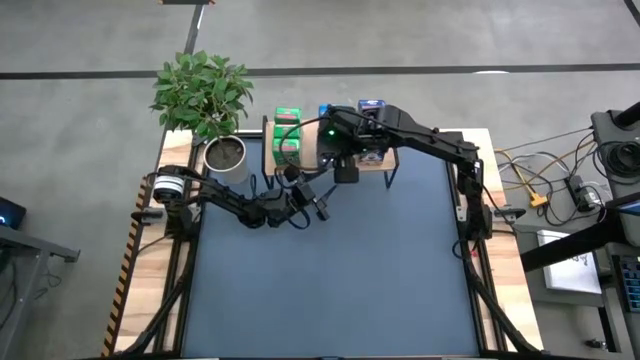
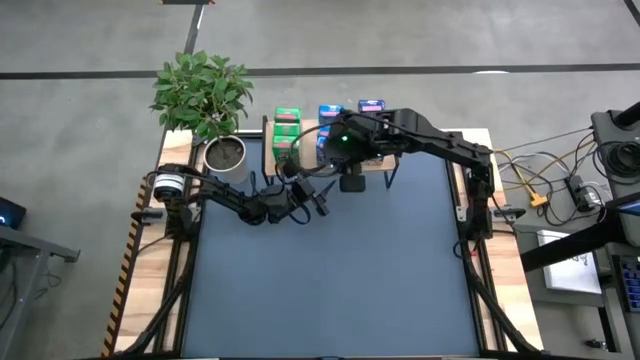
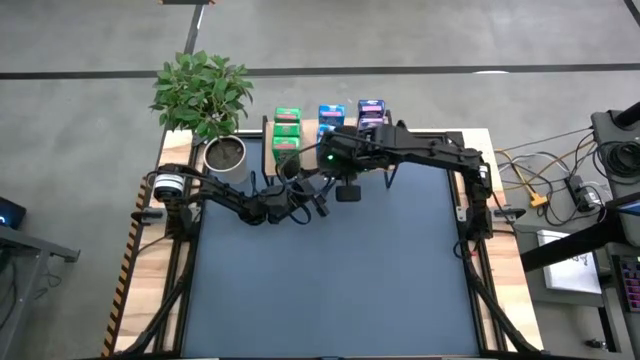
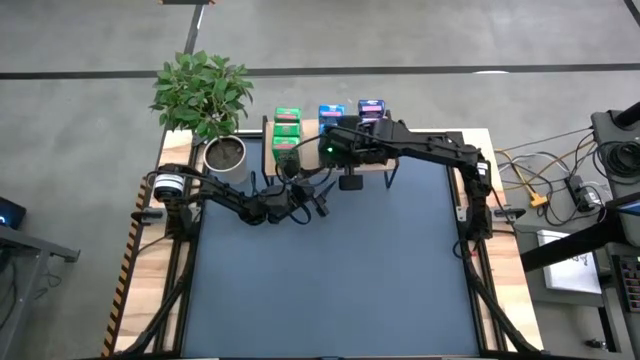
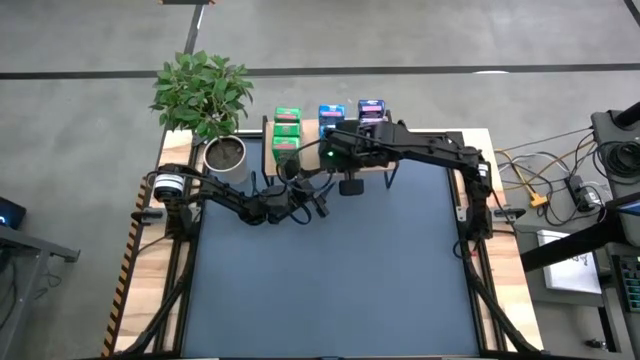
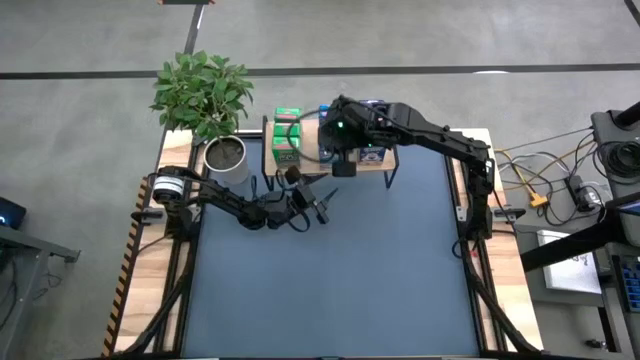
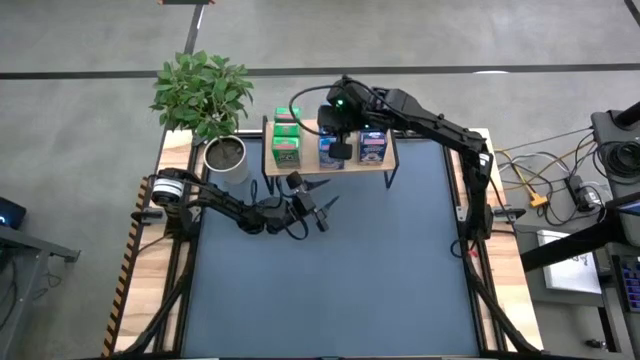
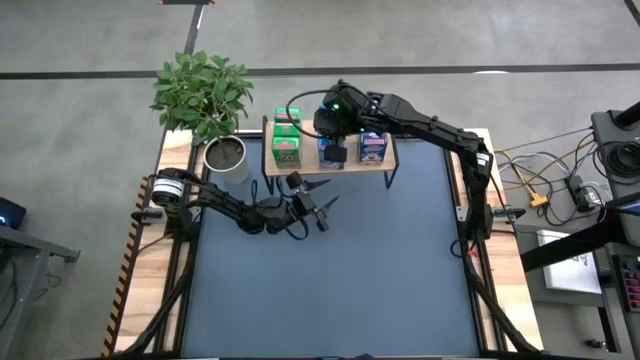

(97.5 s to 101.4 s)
Task: Stack cereal on shelf
Adjust the light blue cereal box on the shelf

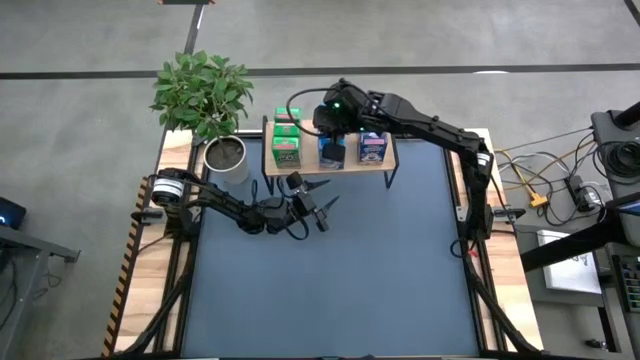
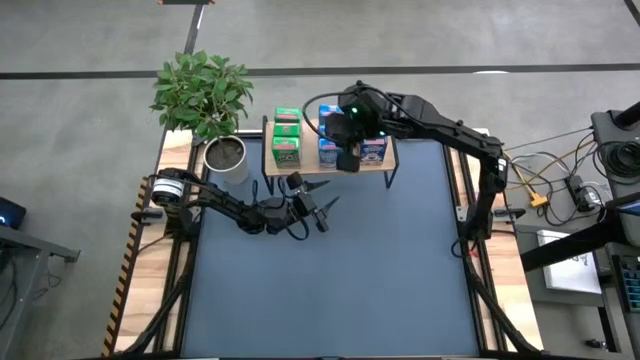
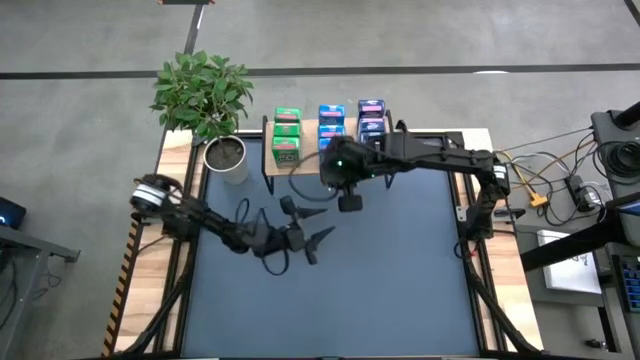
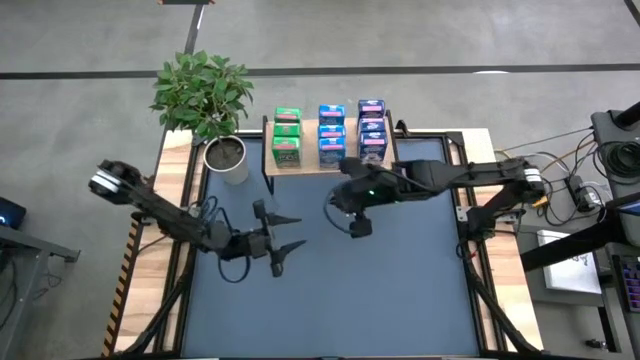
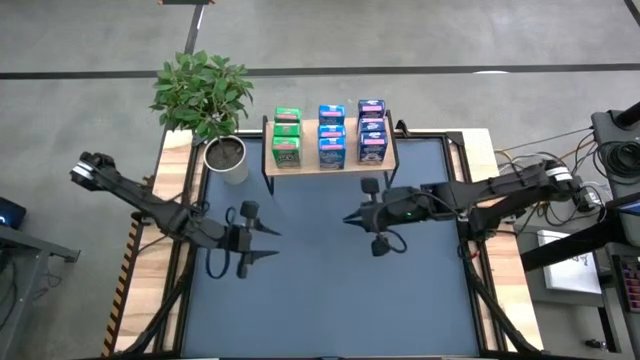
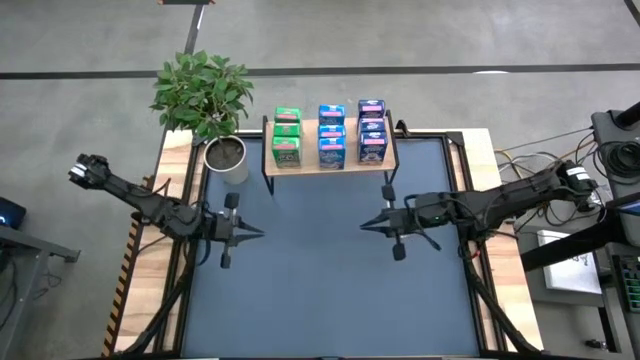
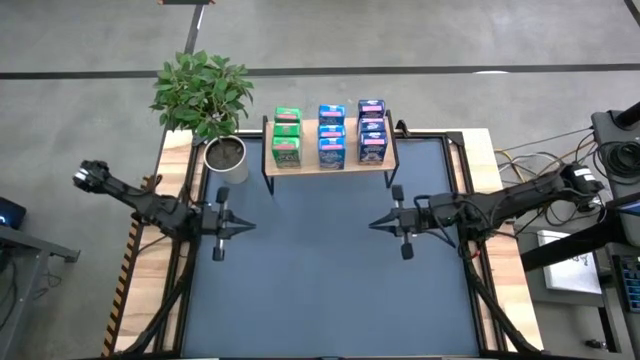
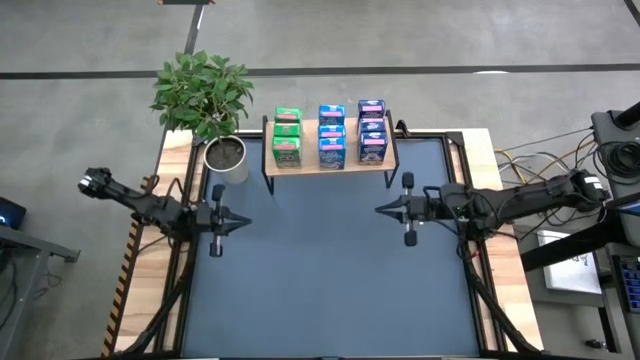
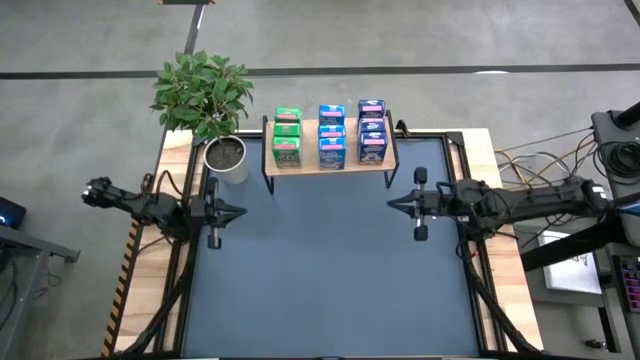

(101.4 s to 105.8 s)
Return to Home Position

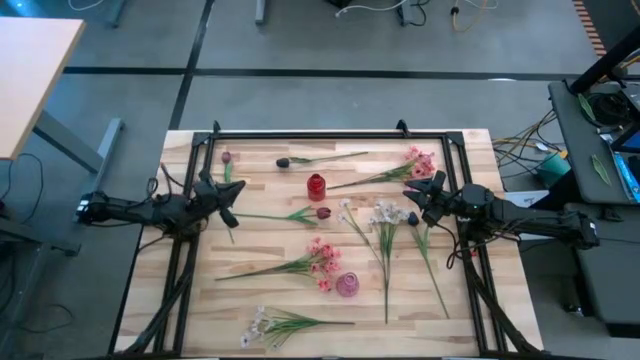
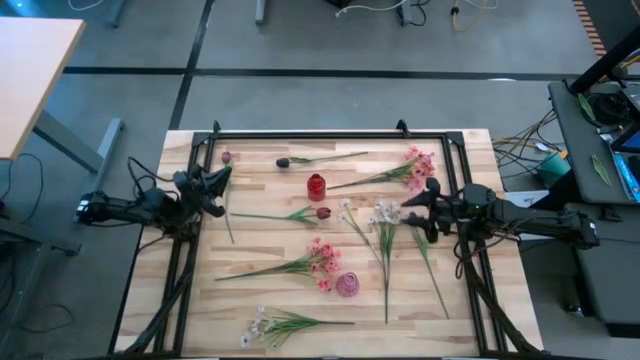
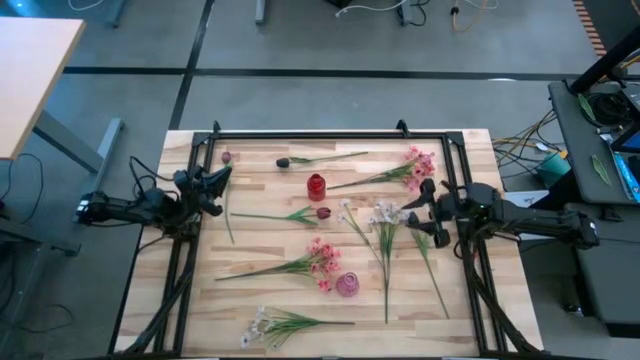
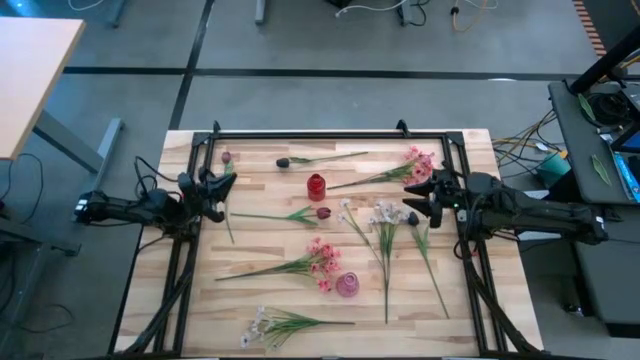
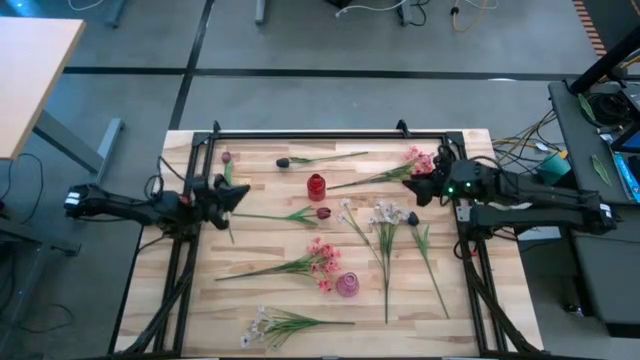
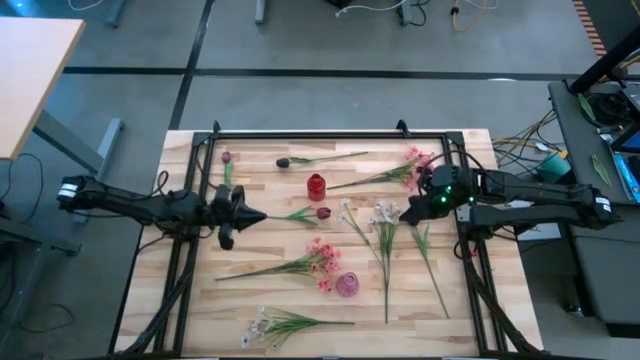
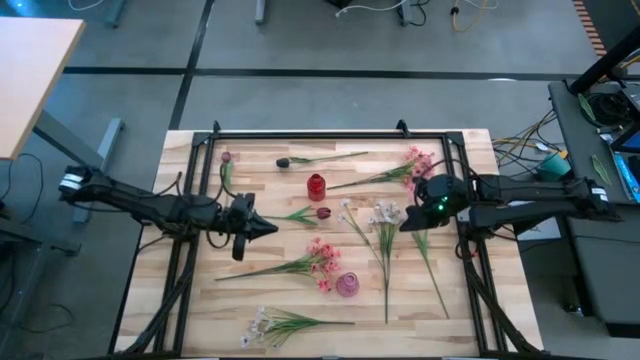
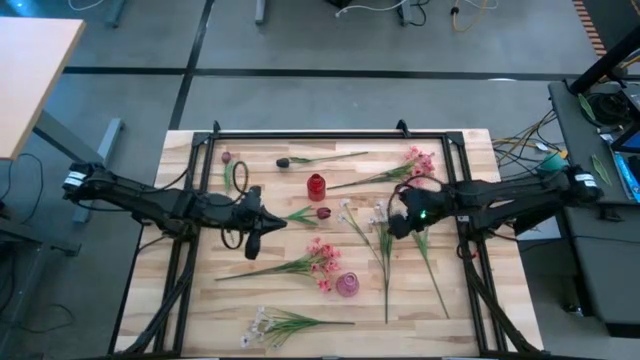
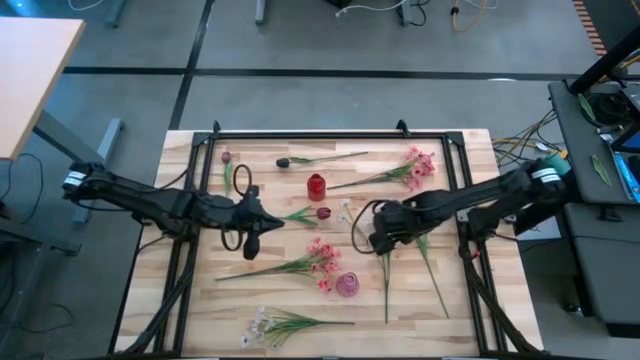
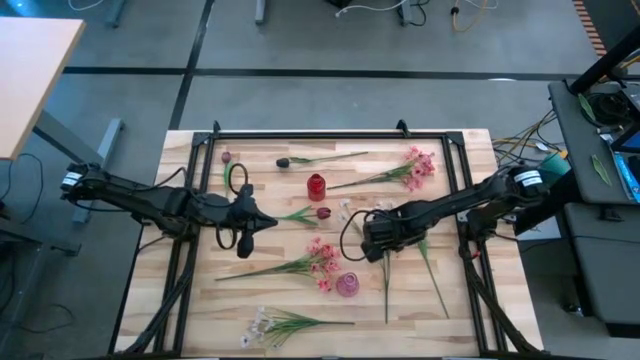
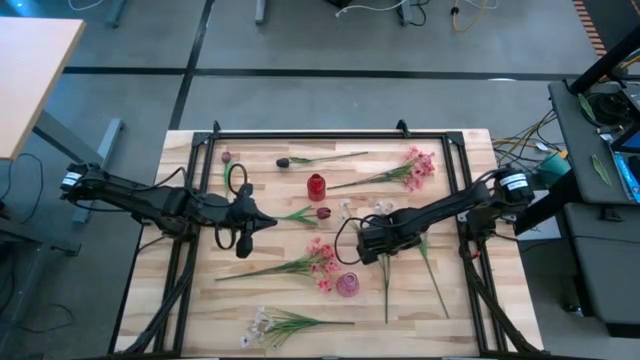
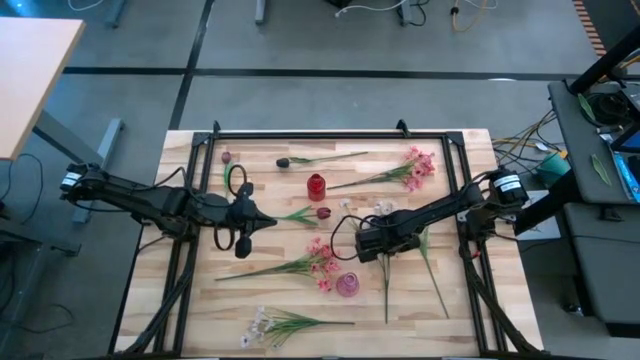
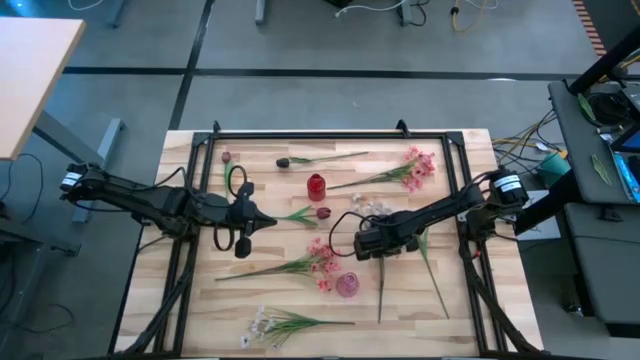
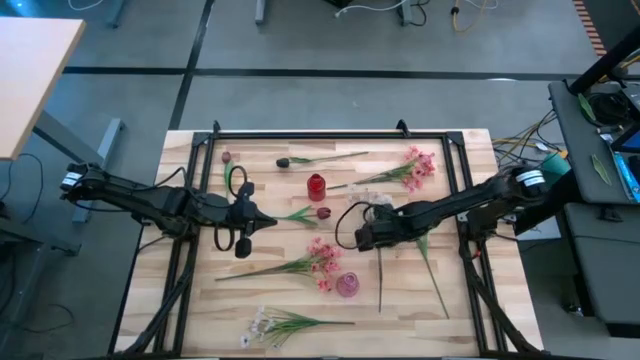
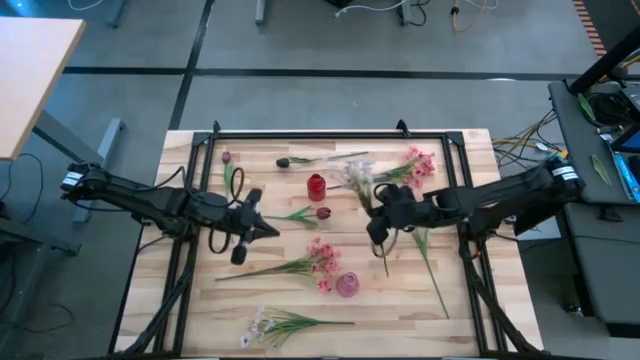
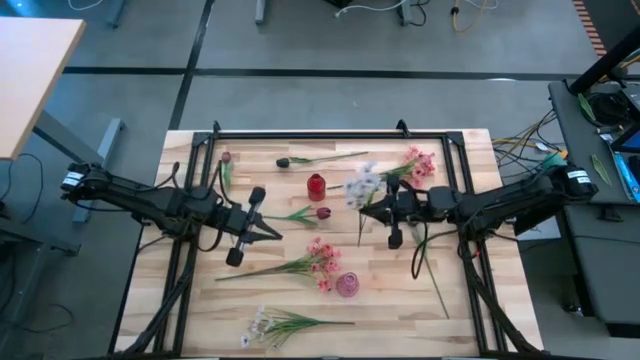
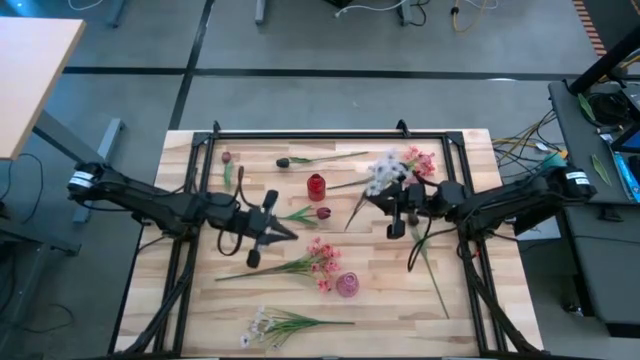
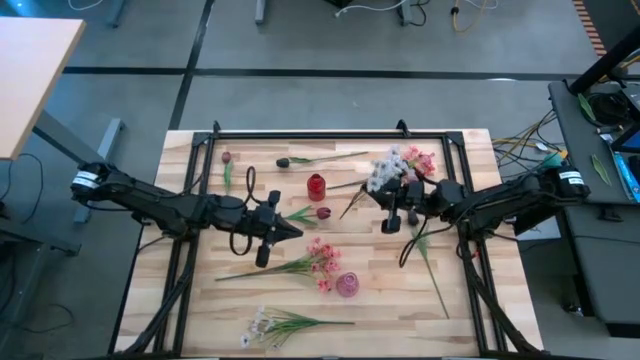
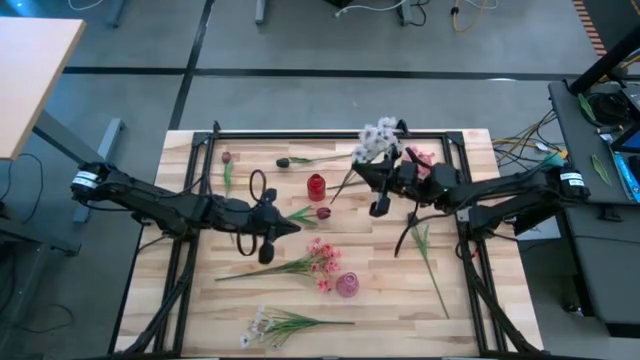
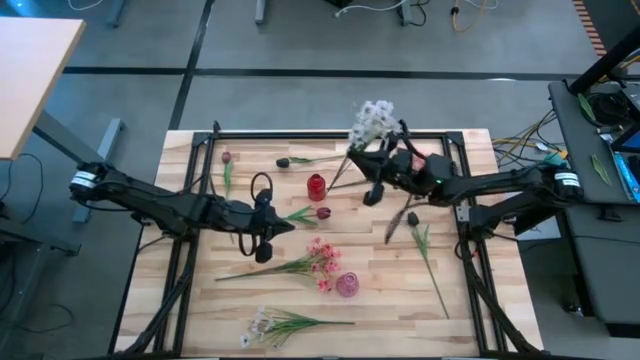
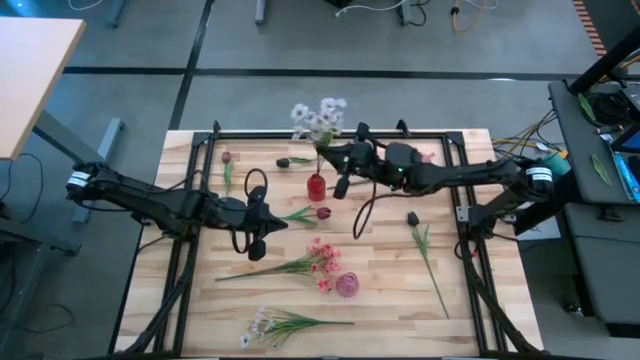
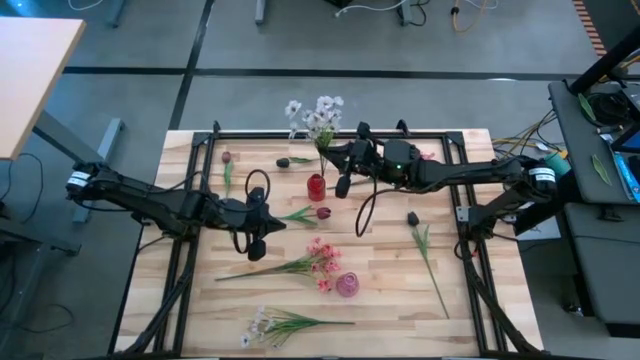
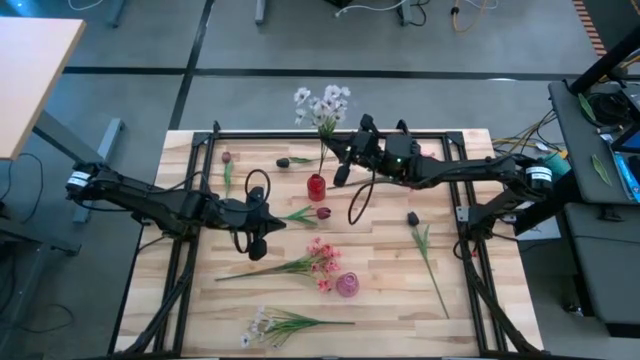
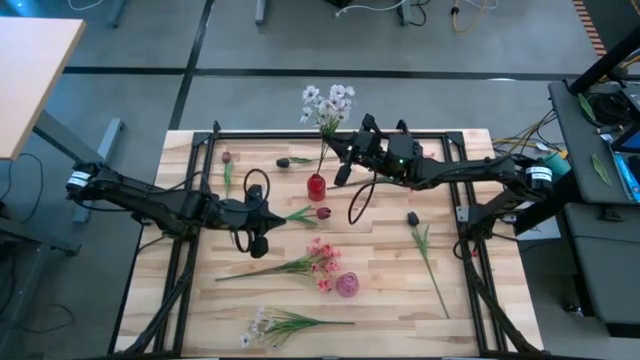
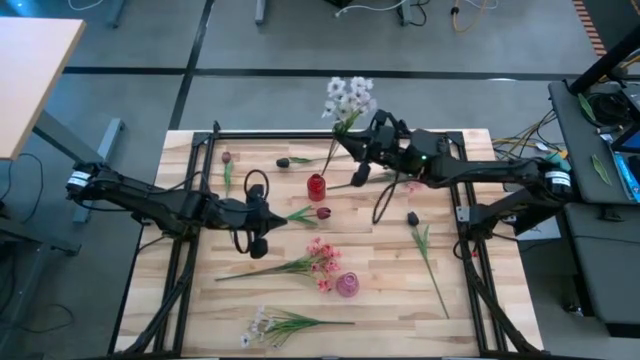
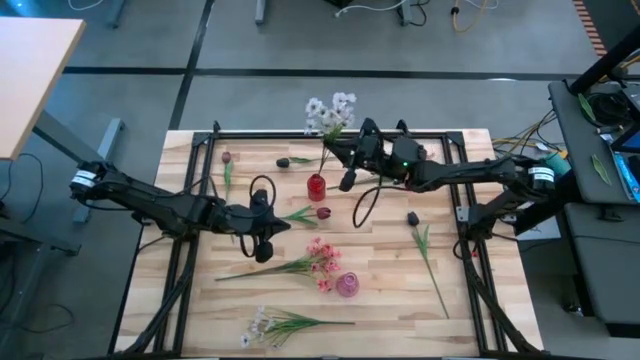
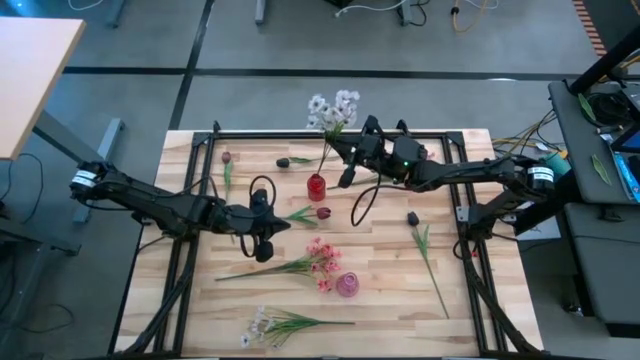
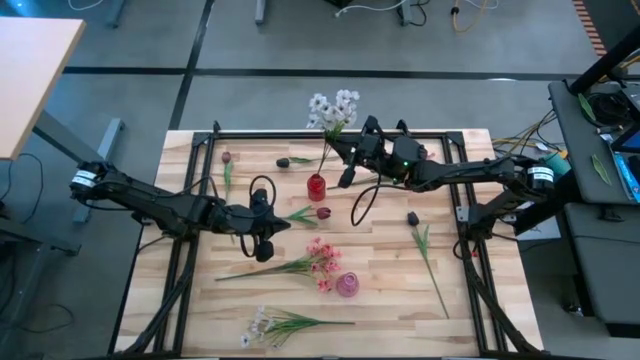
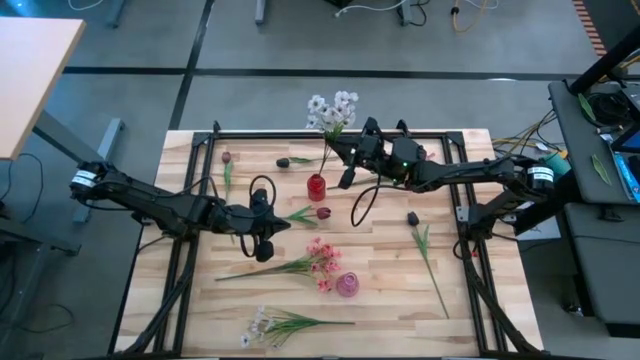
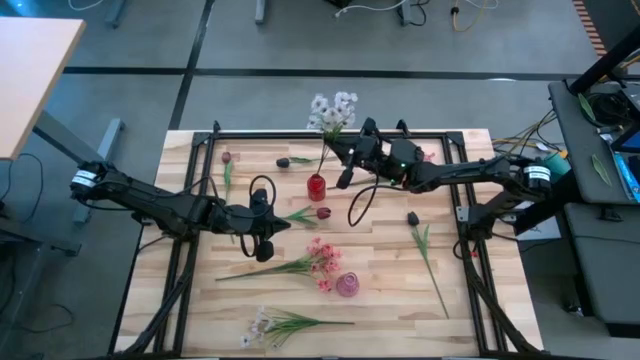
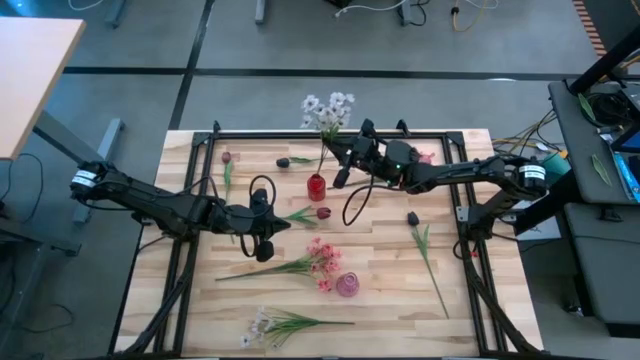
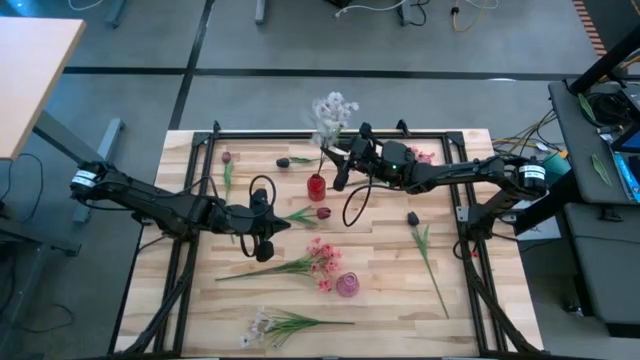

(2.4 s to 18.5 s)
Task: Sort flowers into vase by color
Put the white flowers into the red vase
